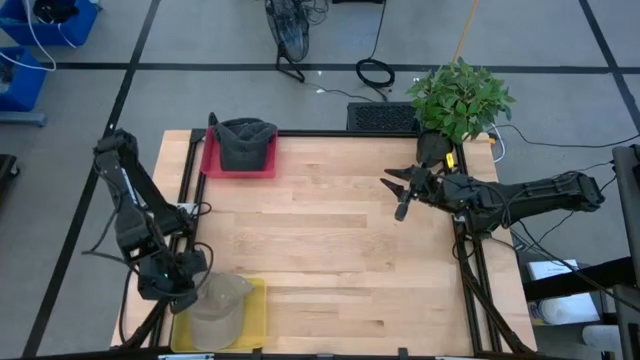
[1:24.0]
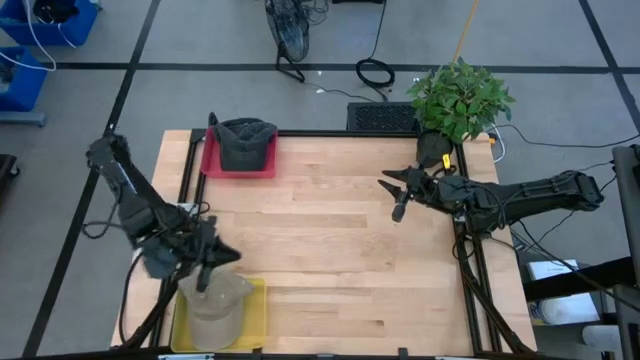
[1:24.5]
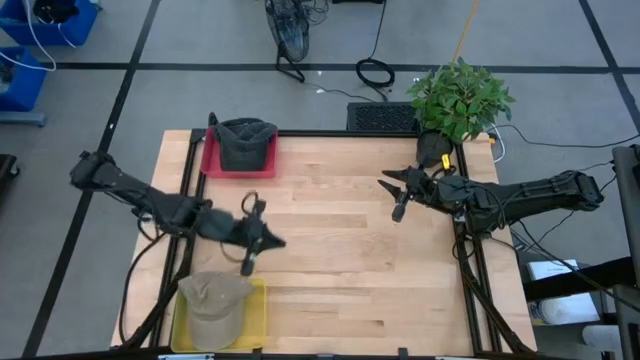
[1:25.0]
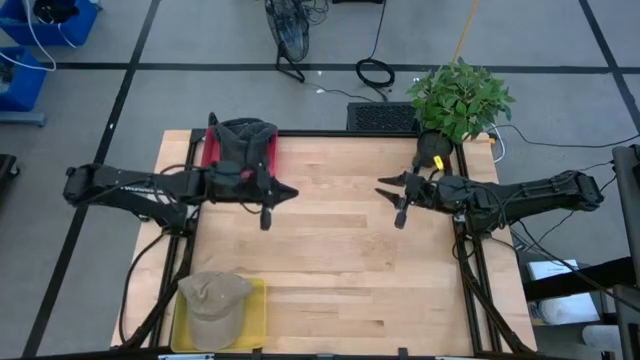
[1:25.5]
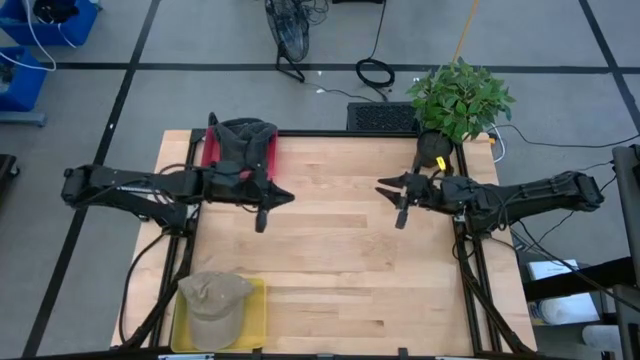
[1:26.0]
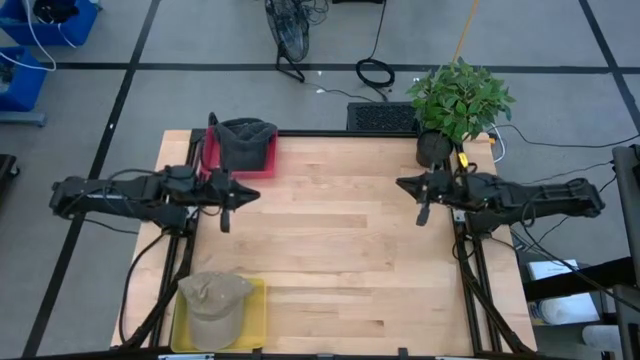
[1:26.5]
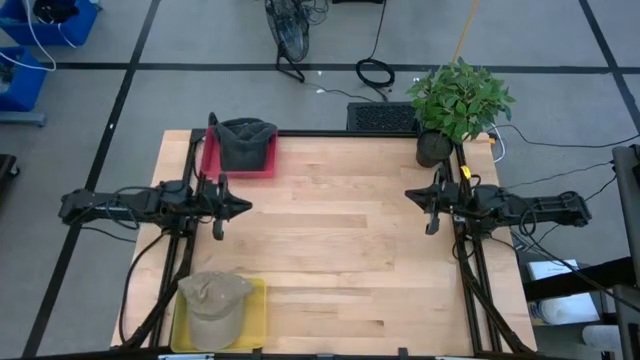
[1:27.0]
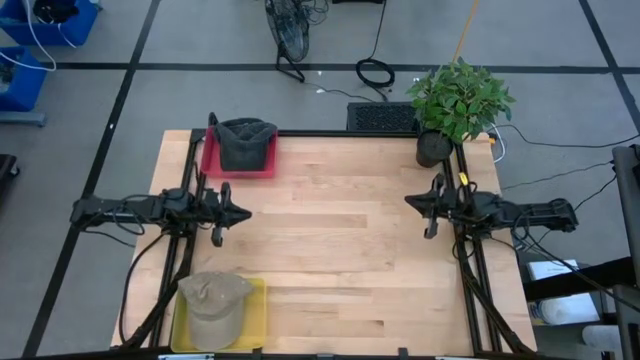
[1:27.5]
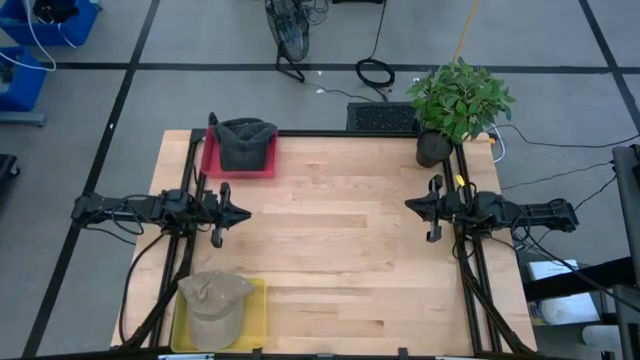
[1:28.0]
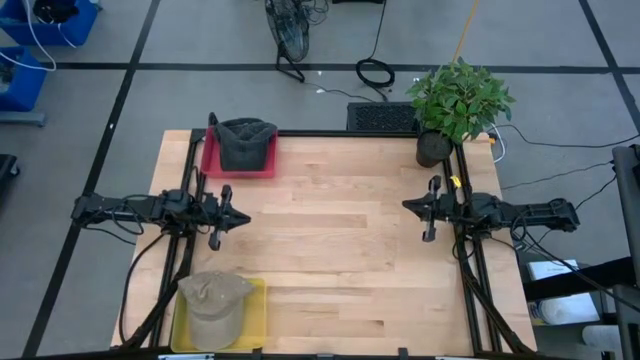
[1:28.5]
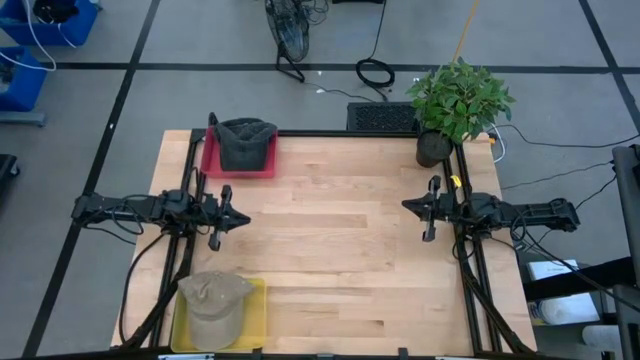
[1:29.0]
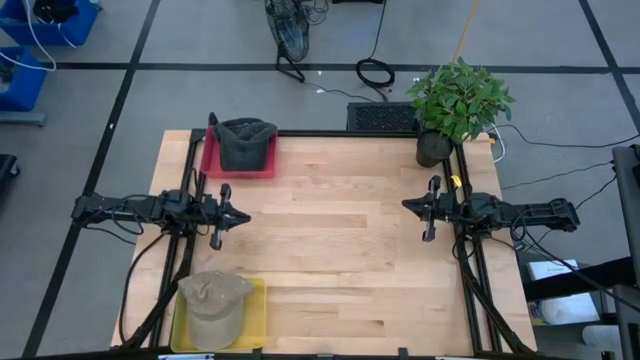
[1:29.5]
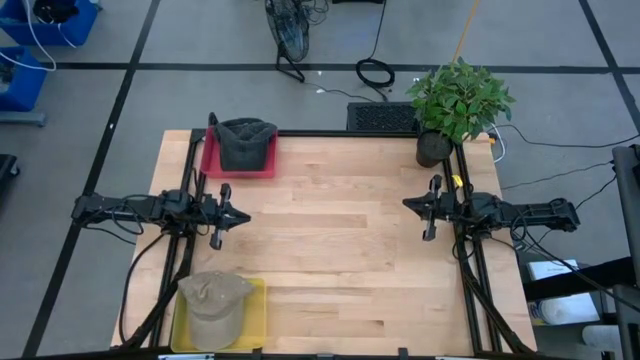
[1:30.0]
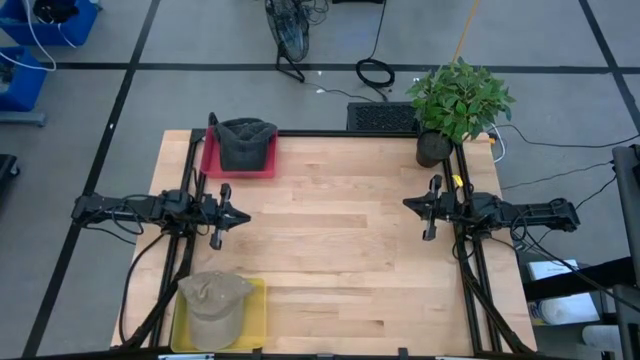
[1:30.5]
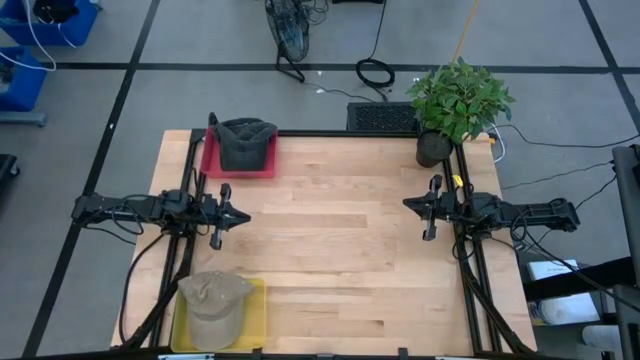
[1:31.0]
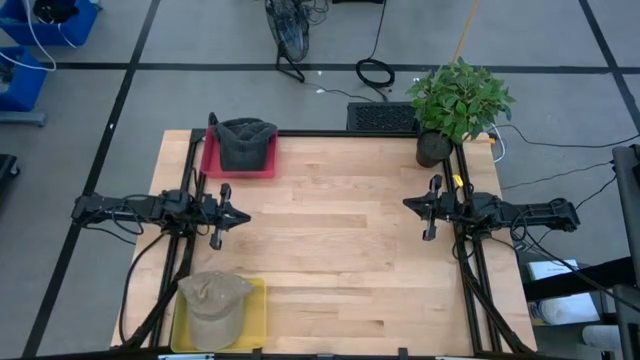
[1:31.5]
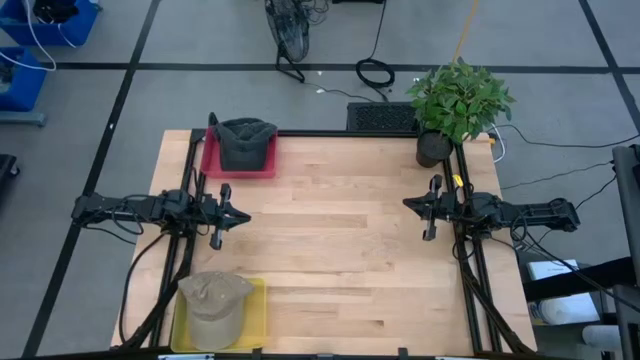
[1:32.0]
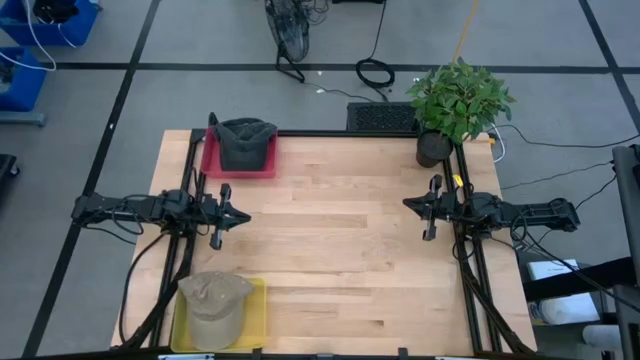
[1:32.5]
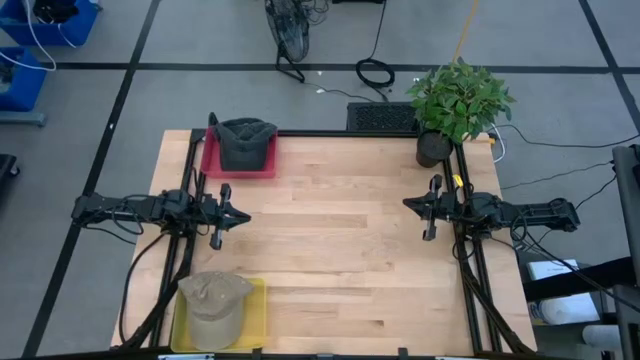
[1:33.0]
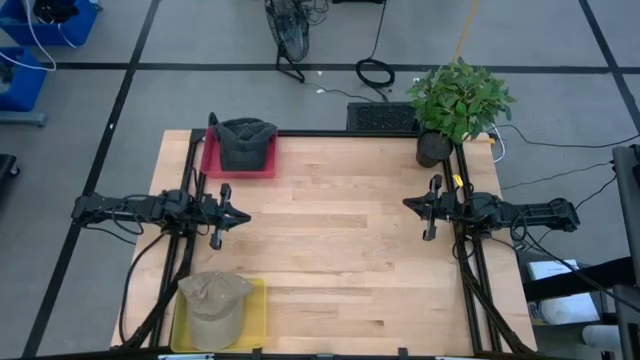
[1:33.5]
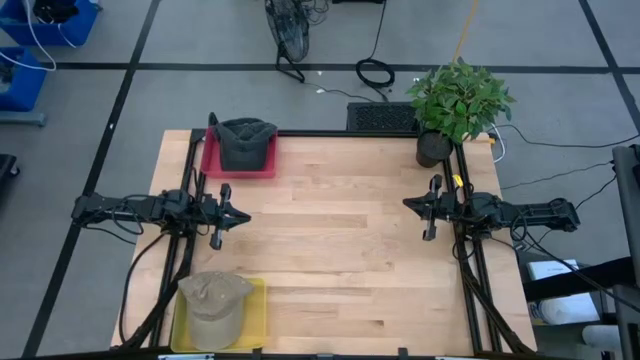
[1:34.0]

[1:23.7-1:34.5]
Task: Pick & Place hat
Return to Home Position

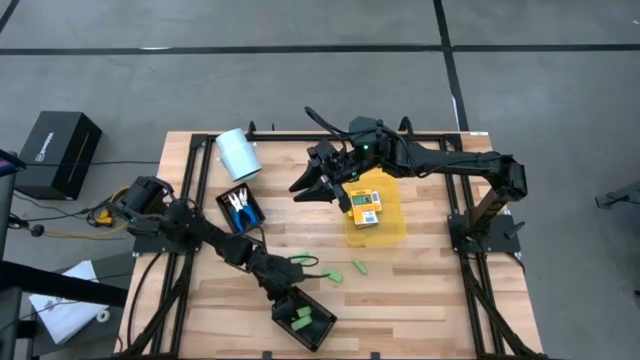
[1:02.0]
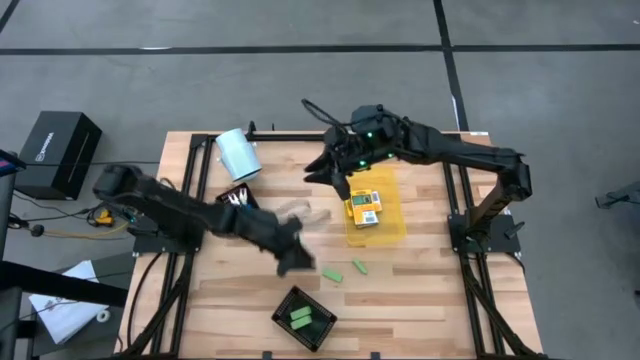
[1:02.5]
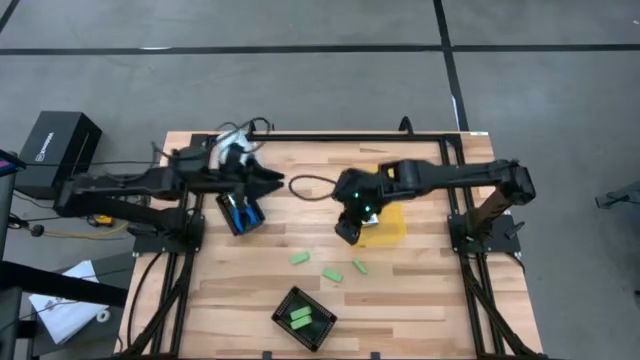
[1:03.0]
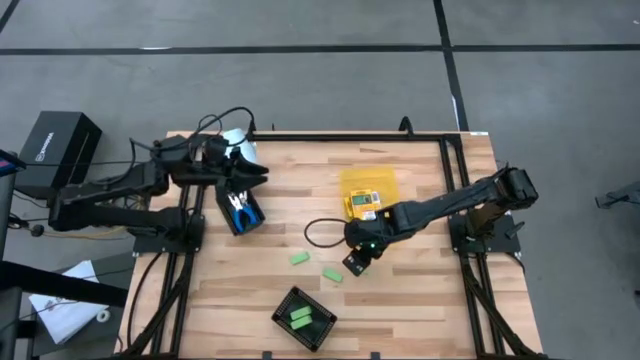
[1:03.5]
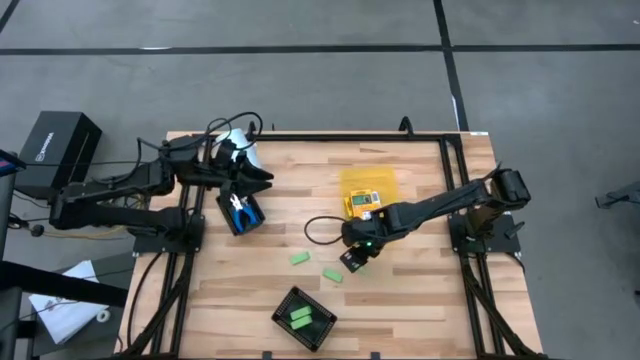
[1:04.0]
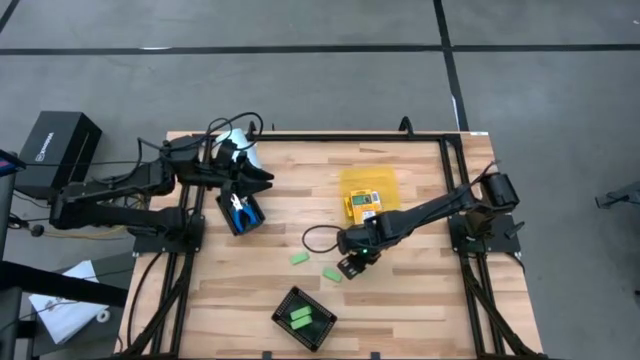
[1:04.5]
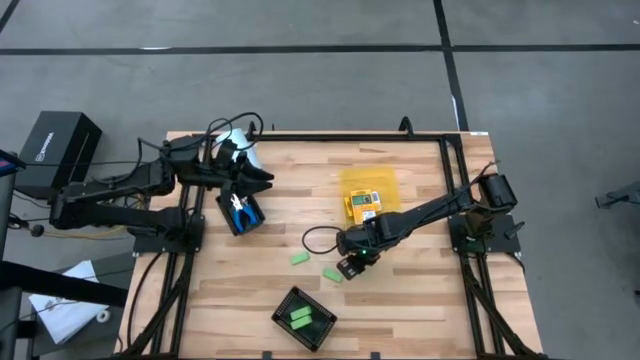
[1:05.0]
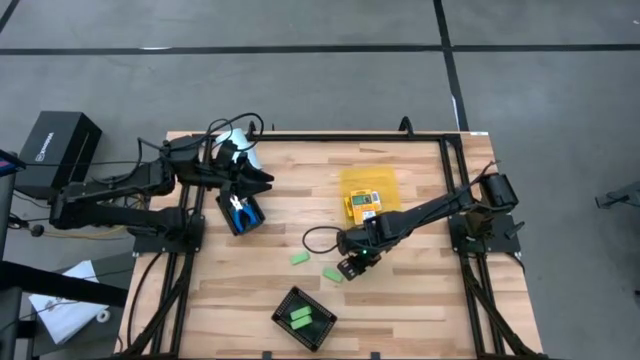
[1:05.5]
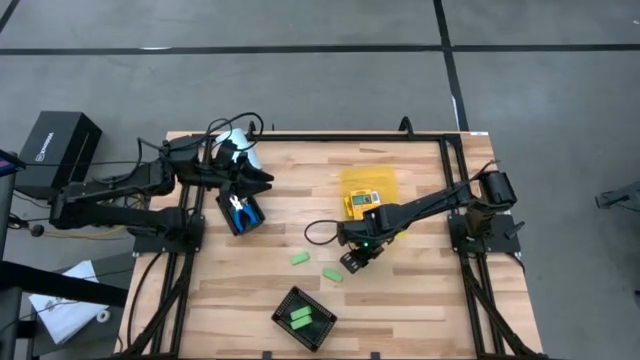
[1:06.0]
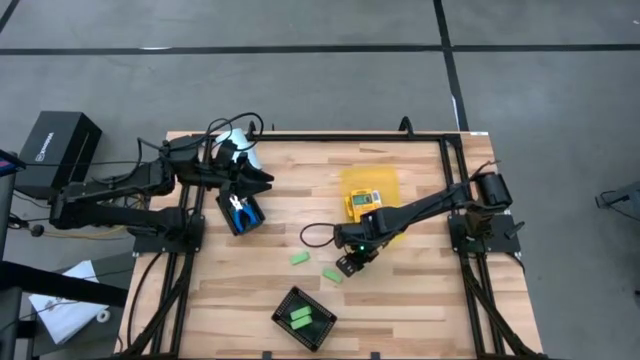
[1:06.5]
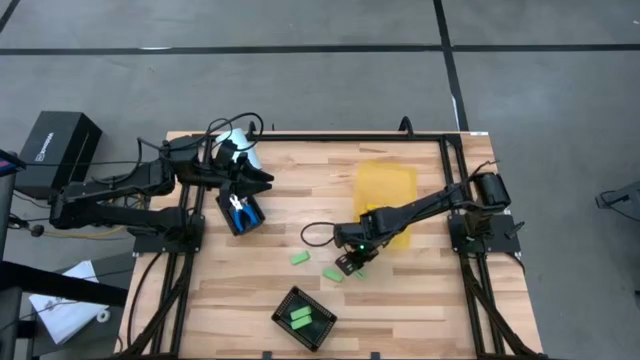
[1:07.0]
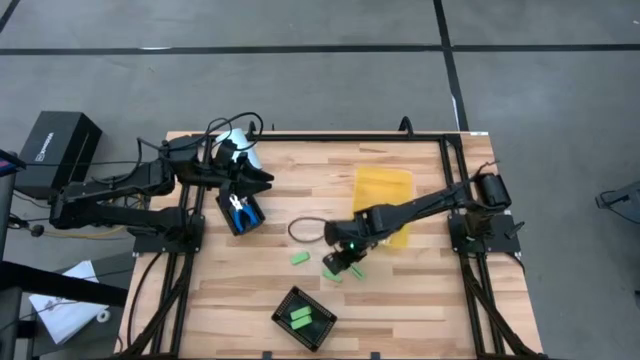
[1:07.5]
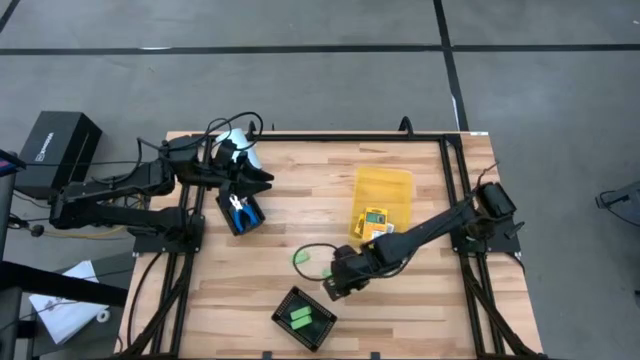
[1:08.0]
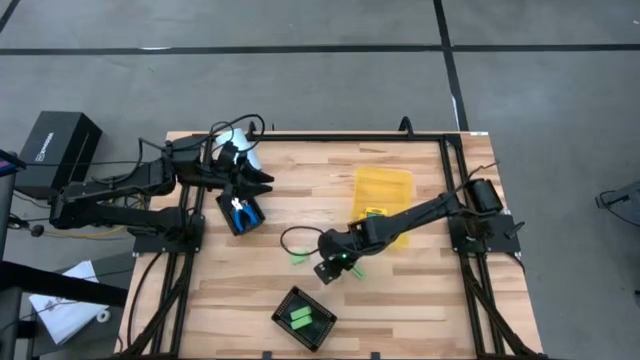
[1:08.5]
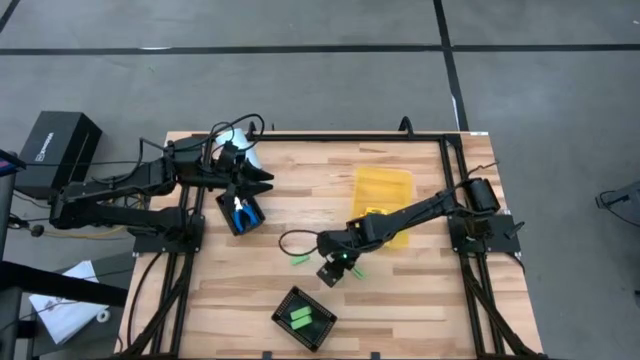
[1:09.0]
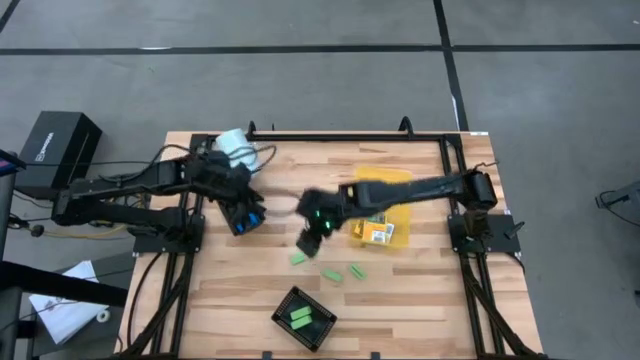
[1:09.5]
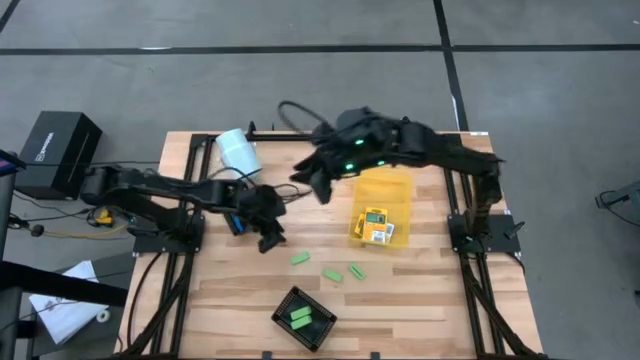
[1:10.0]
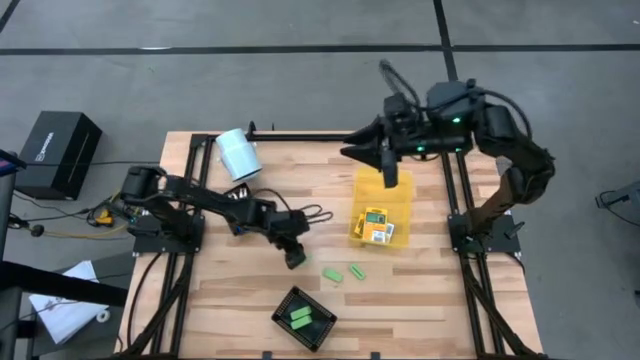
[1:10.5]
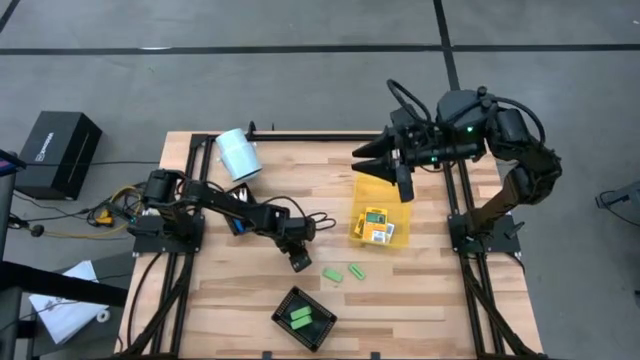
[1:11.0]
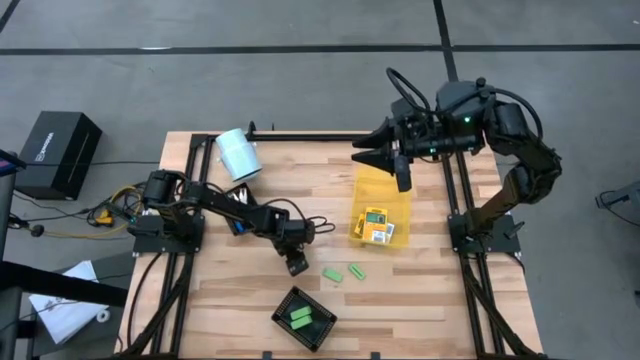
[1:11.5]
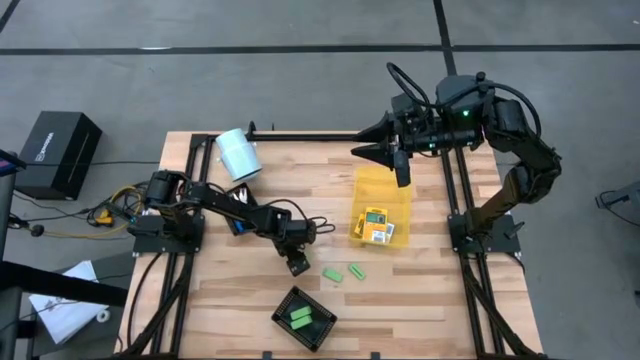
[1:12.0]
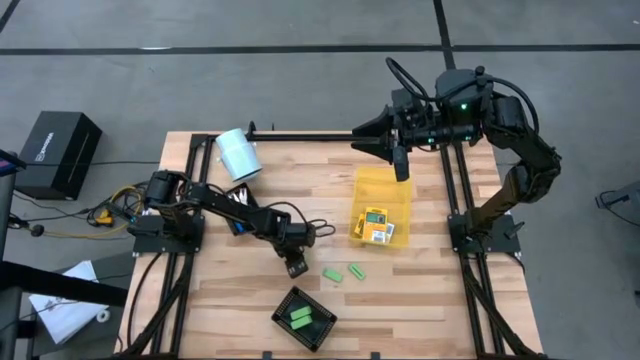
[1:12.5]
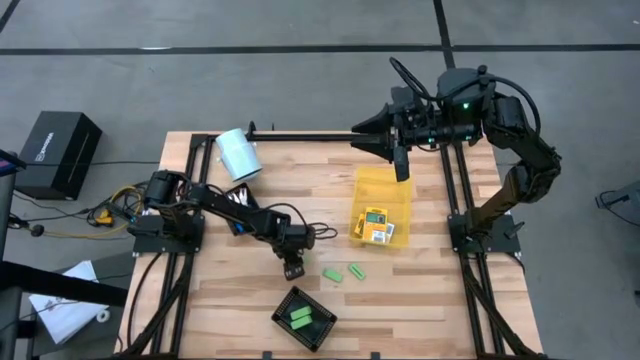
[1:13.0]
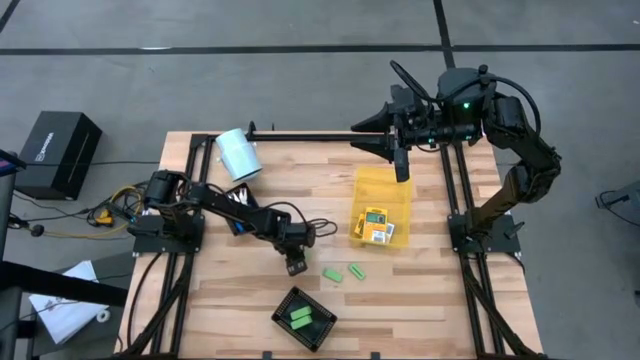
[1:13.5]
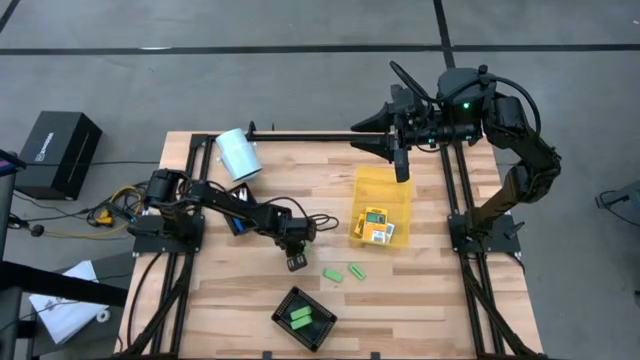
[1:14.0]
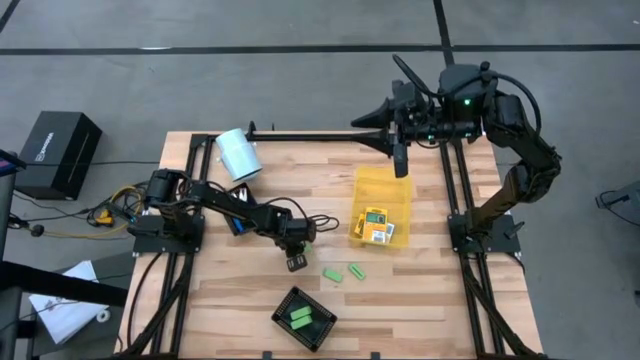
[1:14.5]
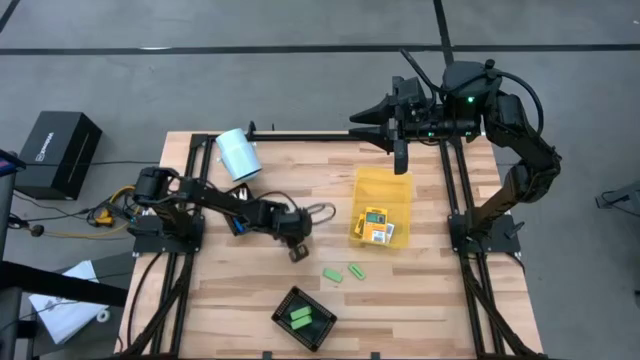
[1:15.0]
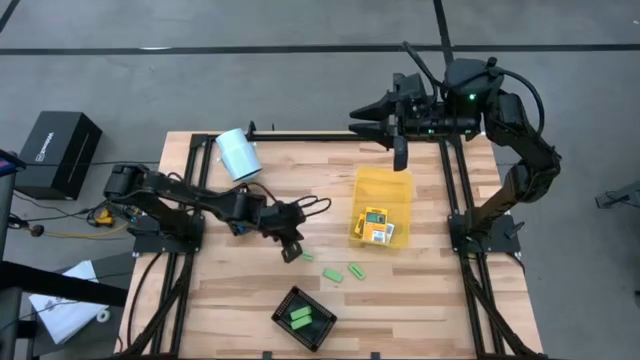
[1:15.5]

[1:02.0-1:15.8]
Task: Pick & Place School Supplies
Put the green eraser into the bottom black bin
